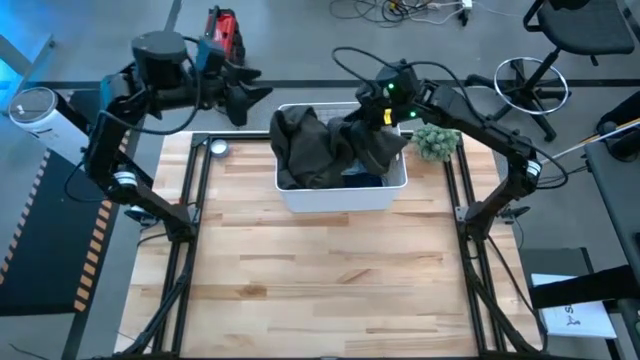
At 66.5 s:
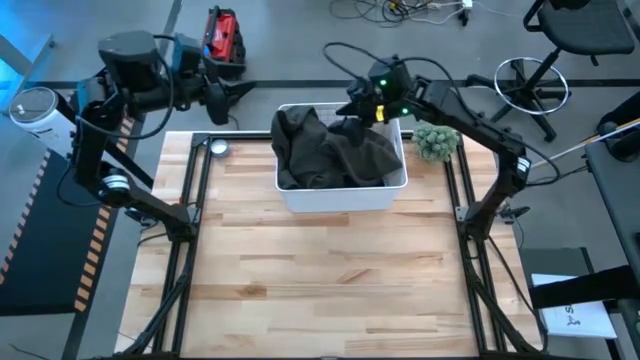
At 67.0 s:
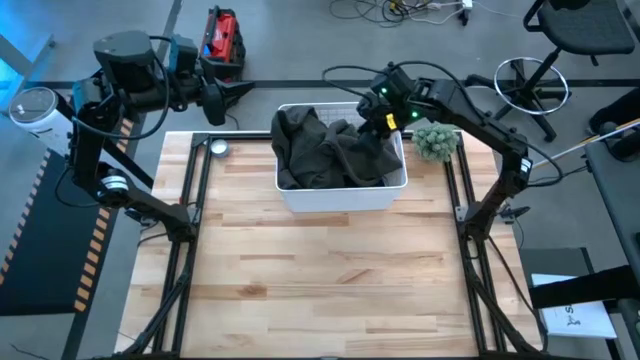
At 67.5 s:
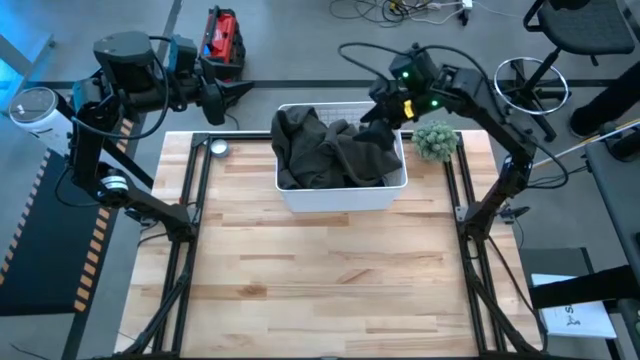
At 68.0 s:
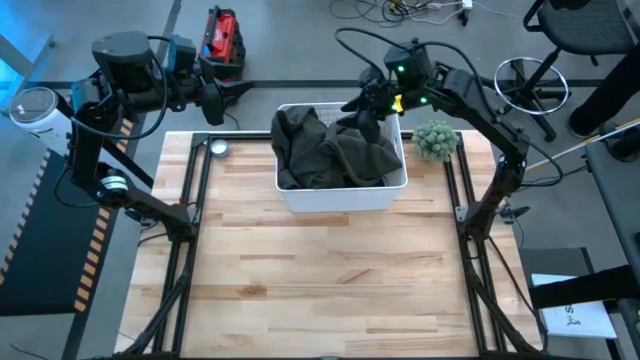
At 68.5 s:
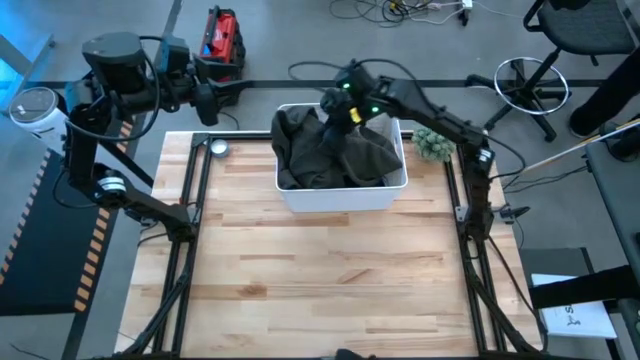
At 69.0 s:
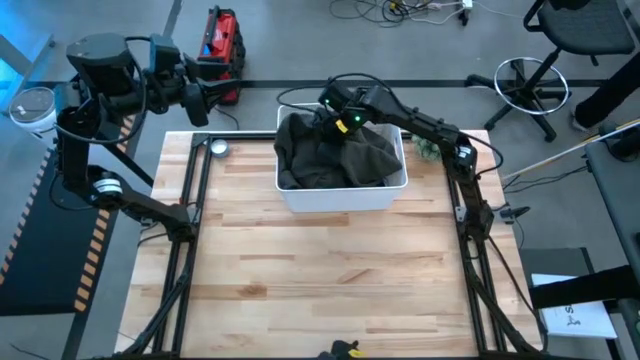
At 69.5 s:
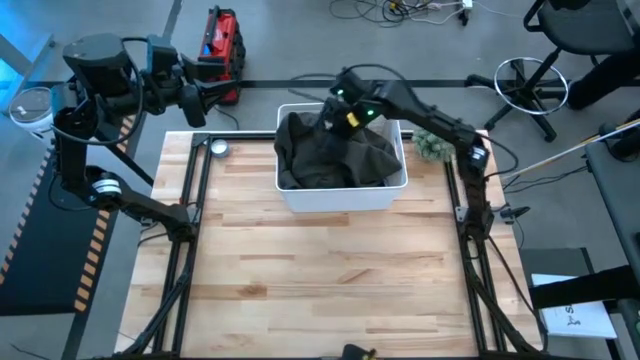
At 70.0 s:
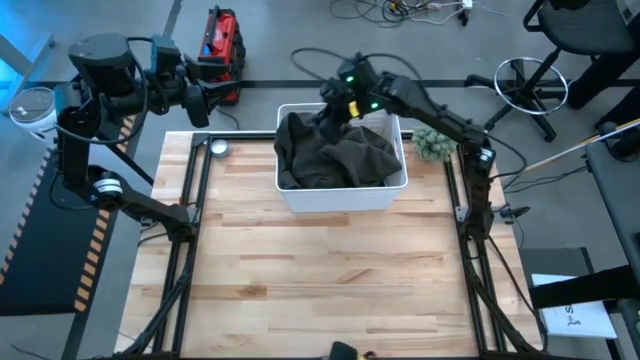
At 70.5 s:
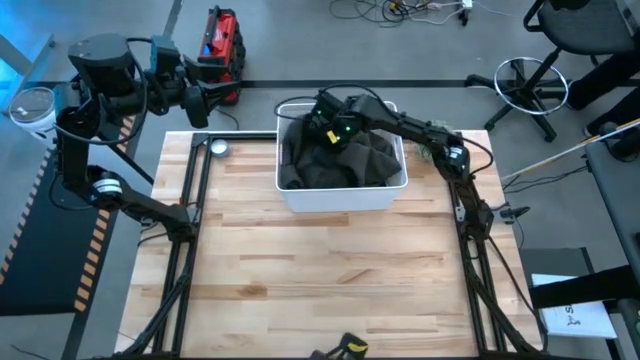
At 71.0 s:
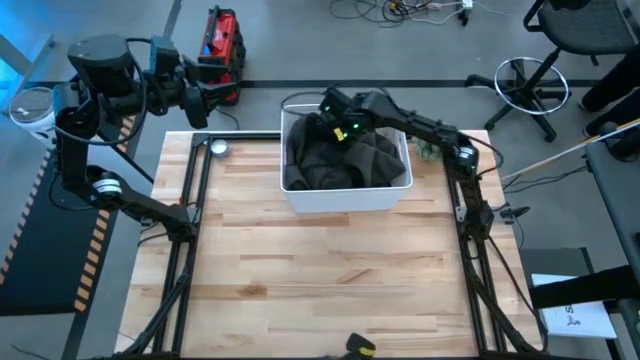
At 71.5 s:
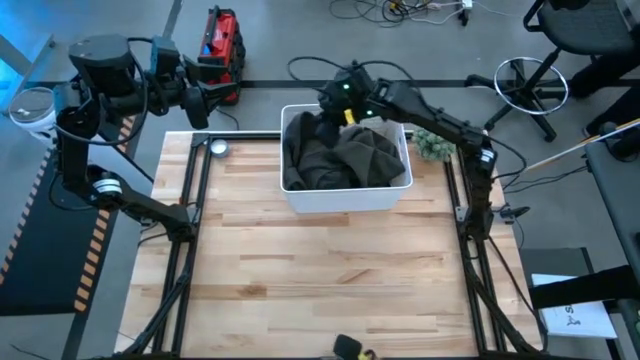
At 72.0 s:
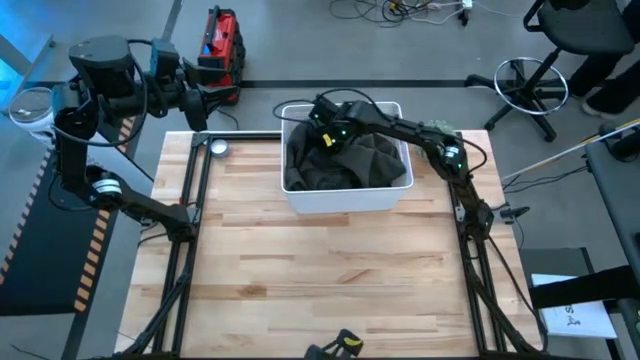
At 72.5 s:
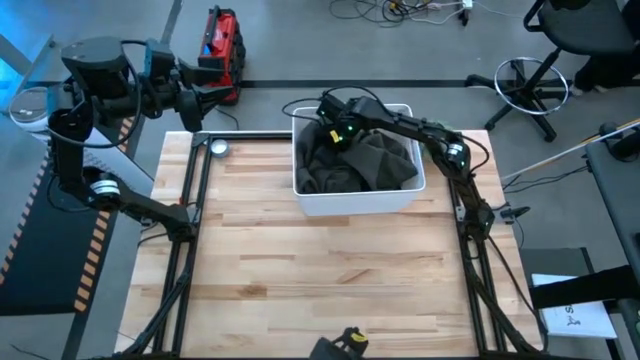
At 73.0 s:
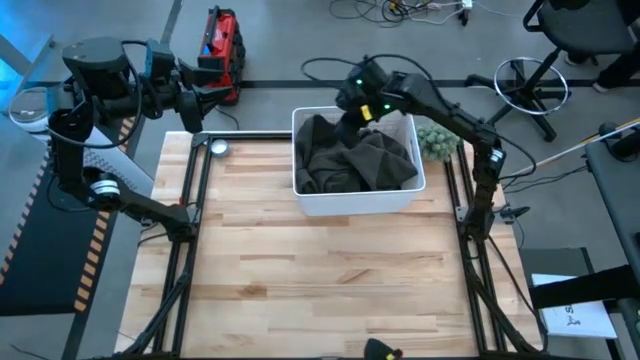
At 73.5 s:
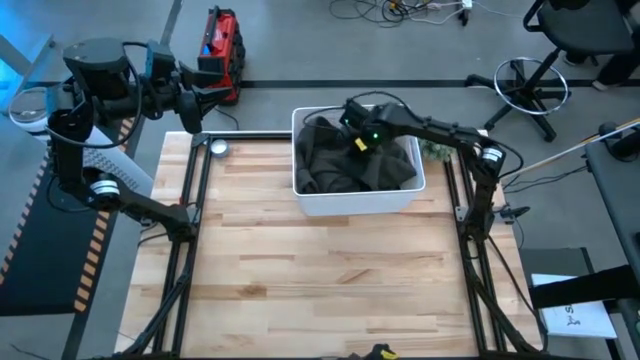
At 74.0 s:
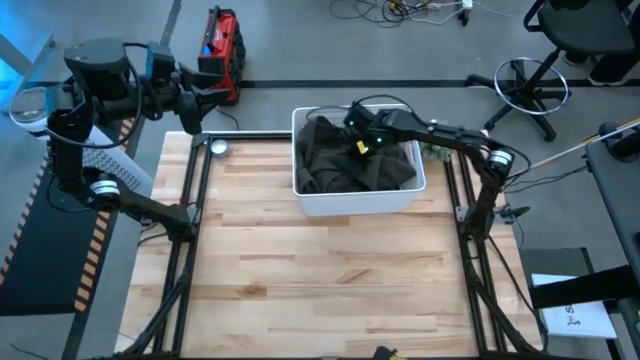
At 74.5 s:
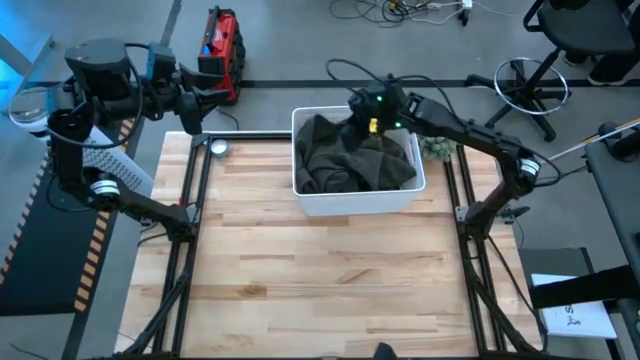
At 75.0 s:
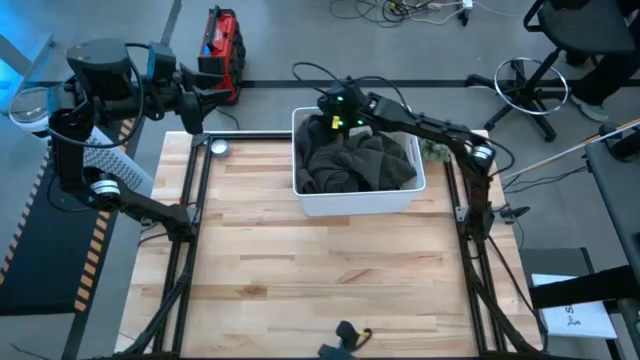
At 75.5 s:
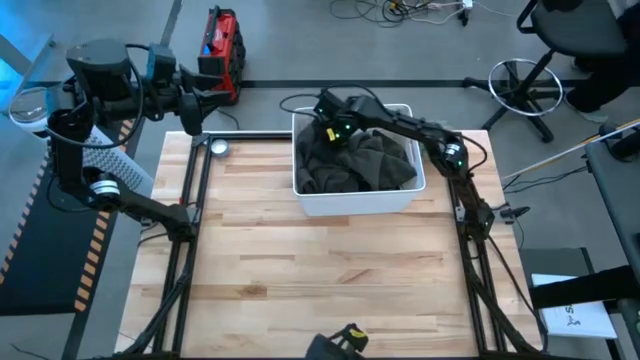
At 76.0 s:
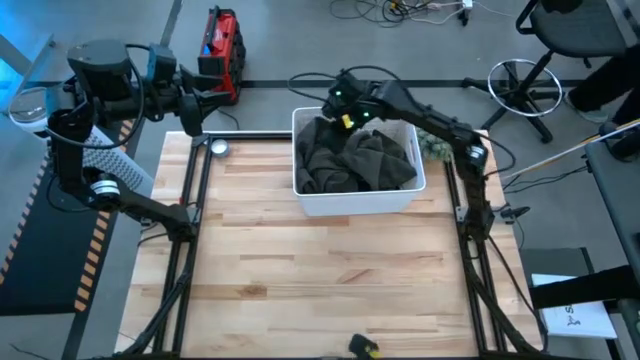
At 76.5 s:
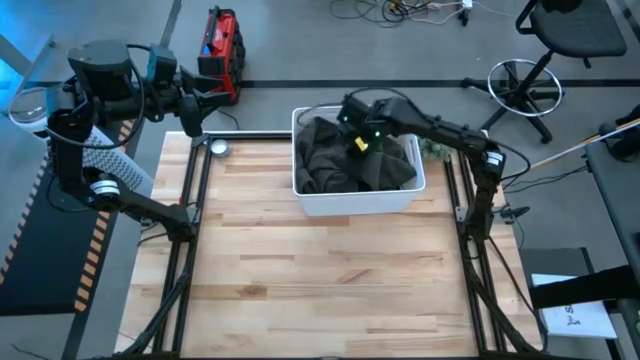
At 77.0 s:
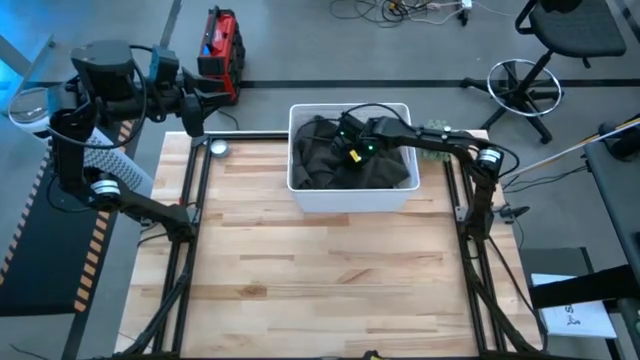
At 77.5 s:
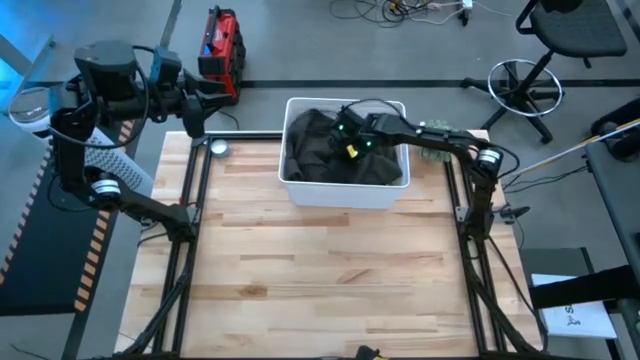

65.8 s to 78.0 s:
Task: Sort clothes
Put the black jacket into the white bin

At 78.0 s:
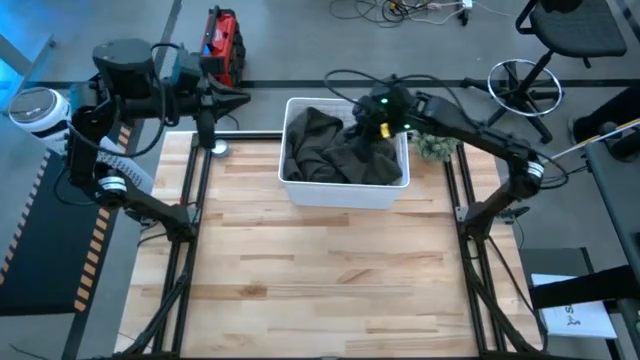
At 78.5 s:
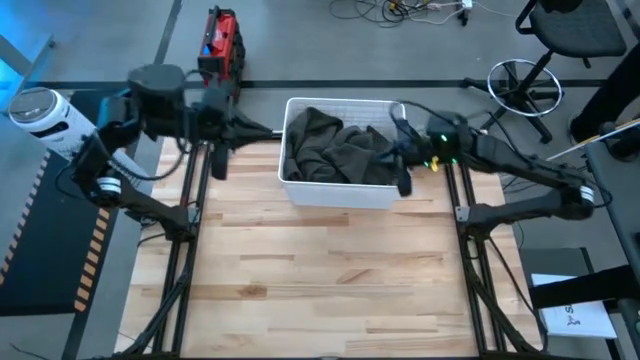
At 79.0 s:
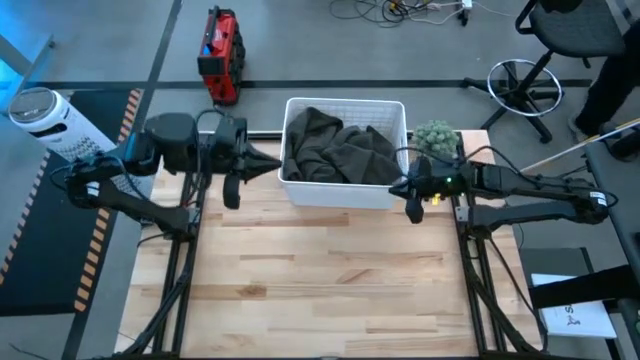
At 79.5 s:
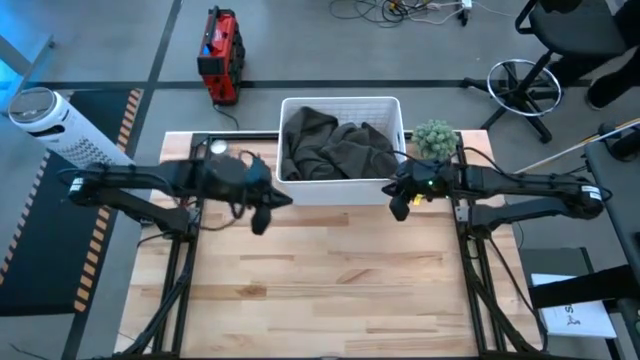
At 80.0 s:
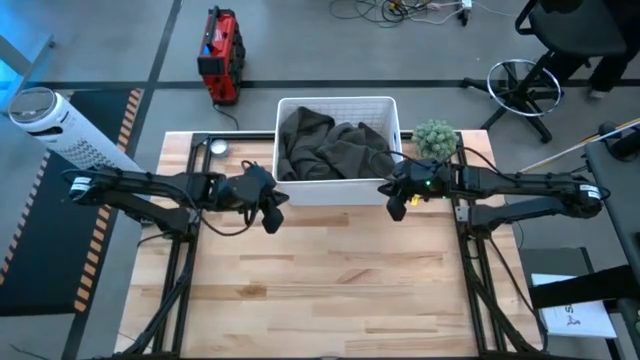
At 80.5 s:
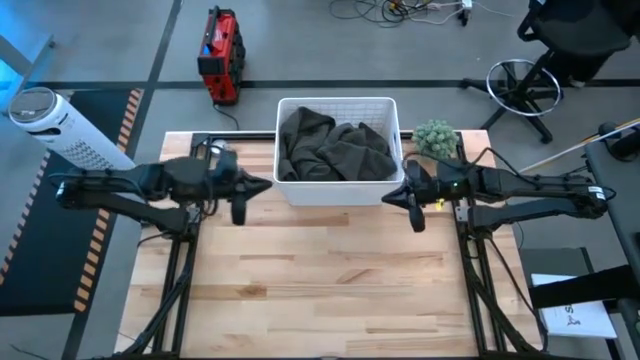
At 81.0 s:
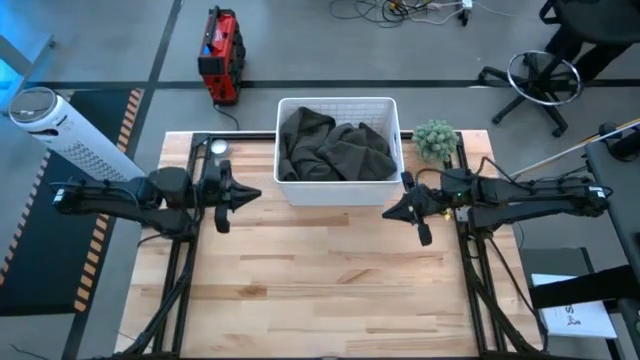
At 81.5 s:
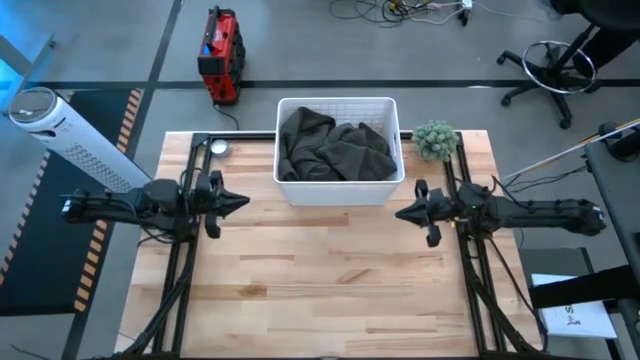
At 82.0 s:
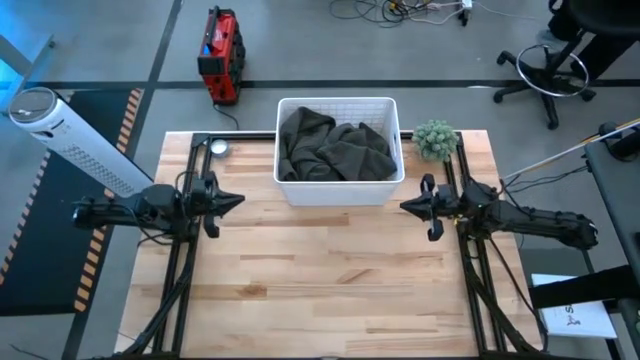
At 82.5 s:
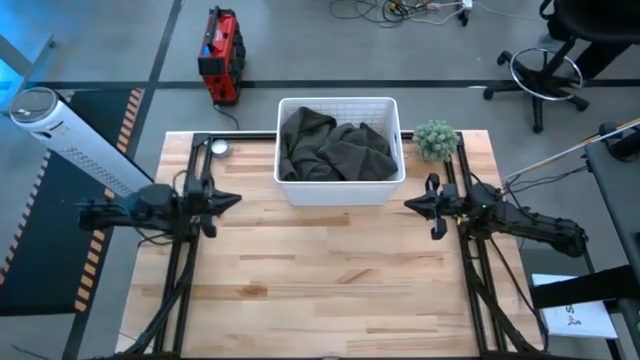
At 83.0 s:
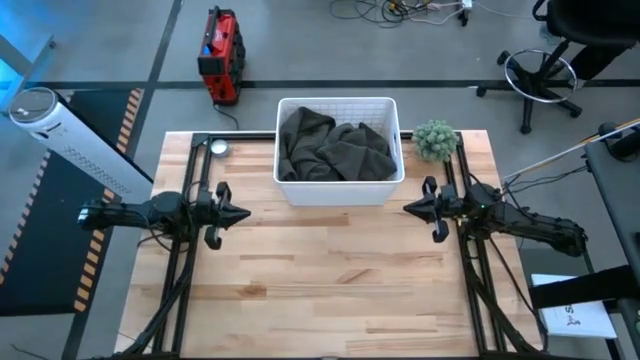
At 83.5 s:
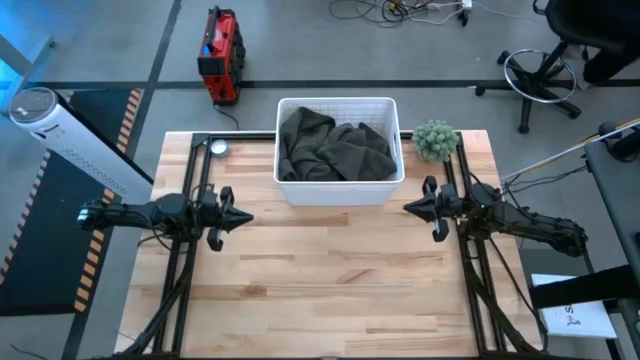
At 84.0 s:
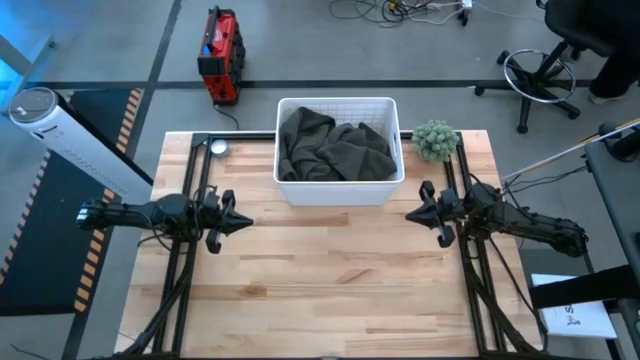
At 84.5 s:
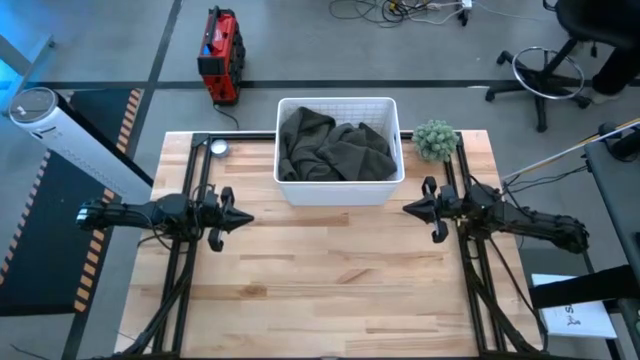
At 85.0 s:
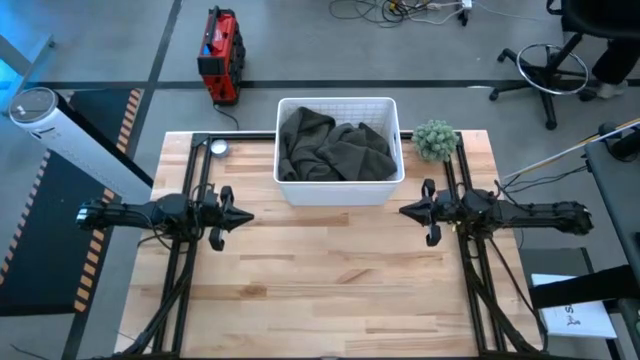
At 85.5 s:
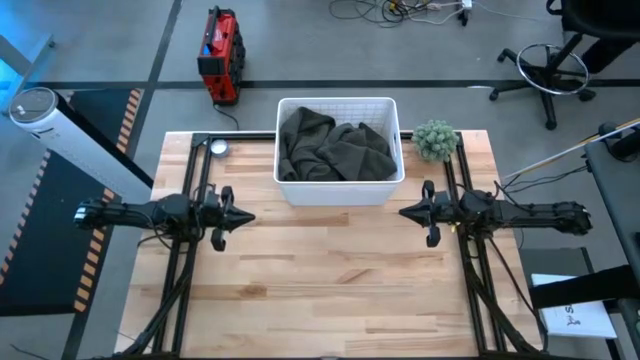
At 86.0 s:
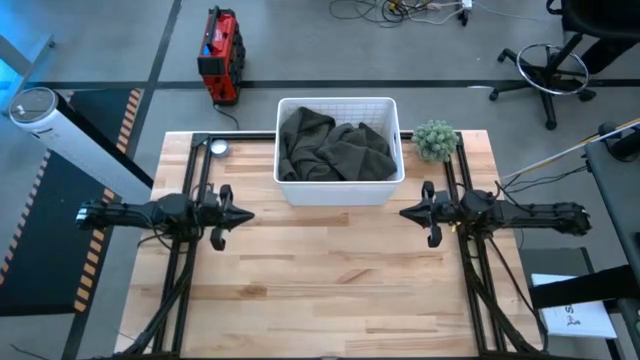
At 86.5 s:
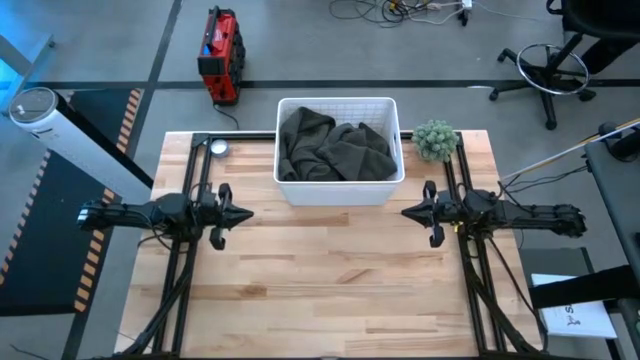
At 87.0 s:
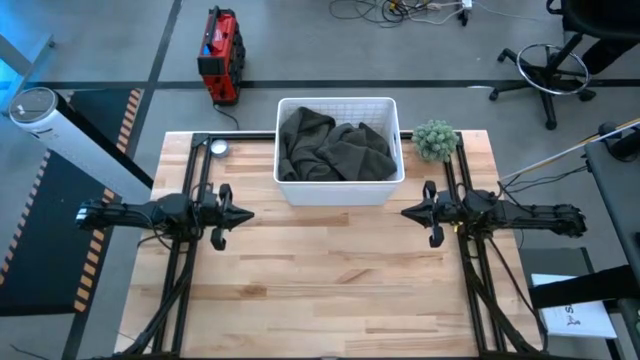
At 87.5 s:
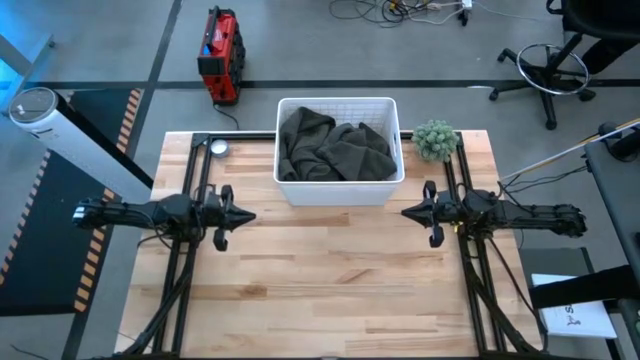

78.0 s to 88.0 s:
Return to Home Position
